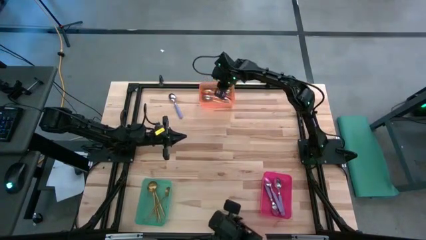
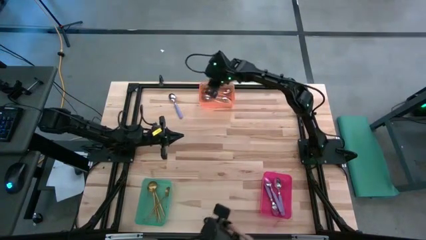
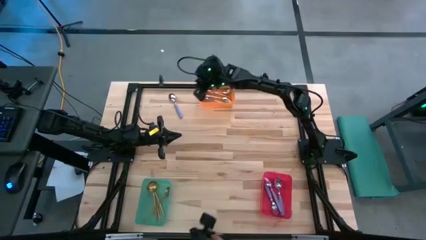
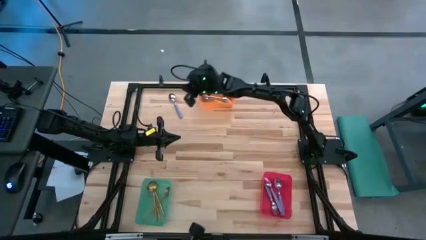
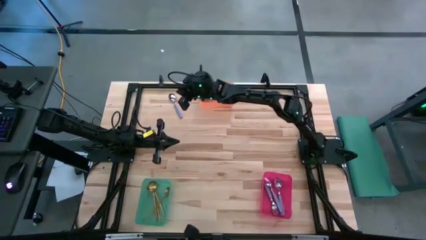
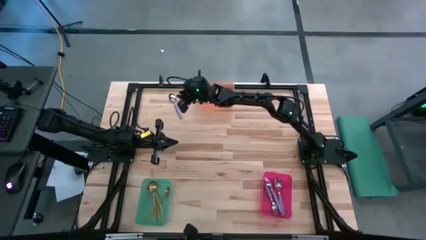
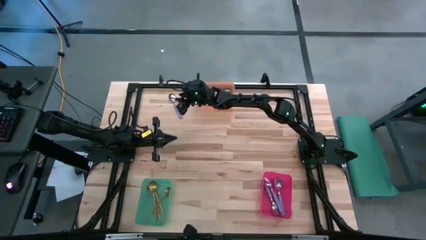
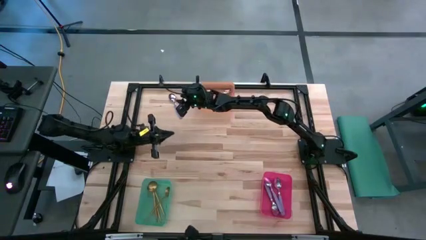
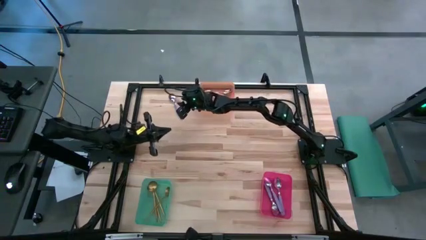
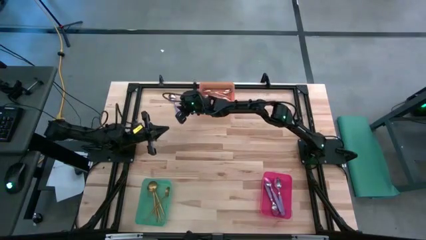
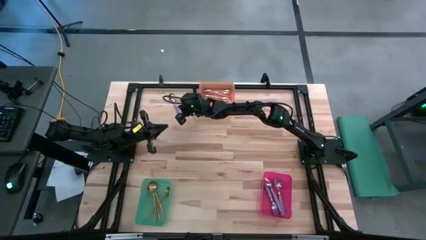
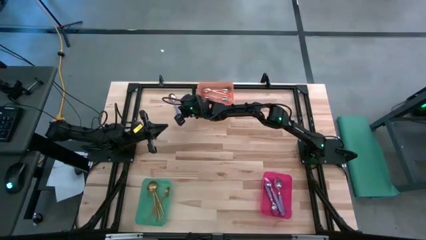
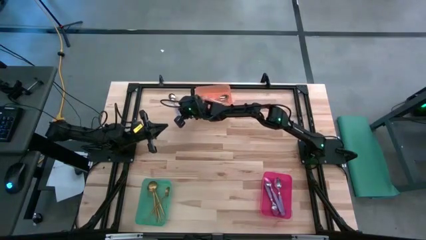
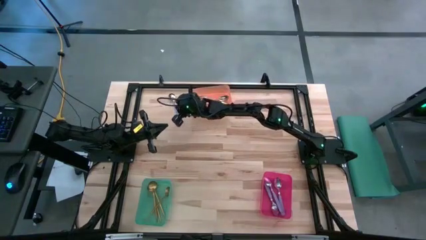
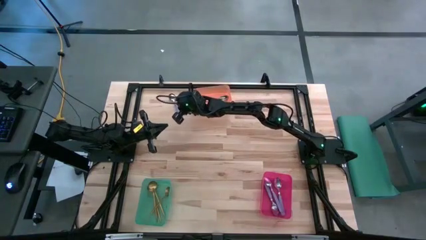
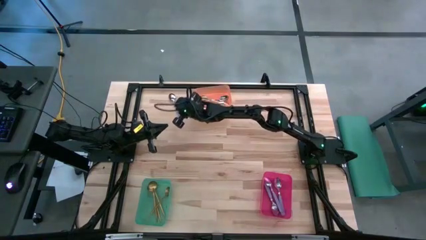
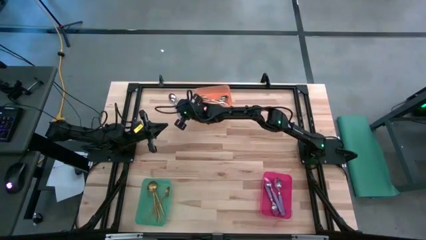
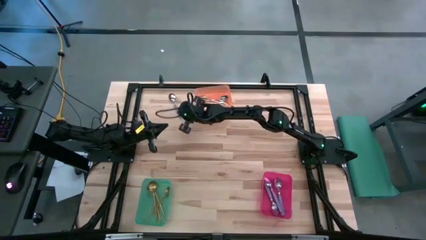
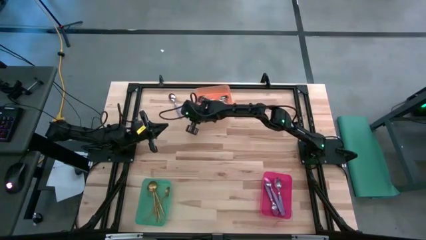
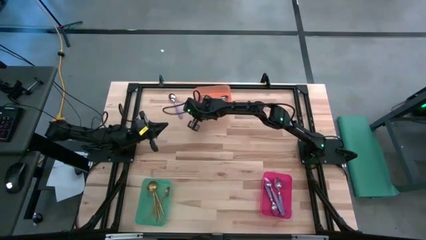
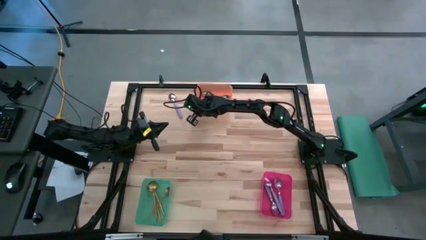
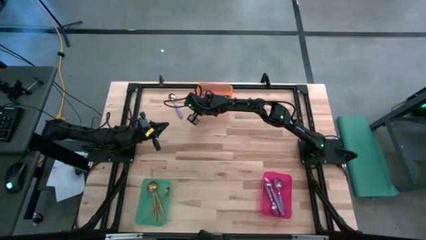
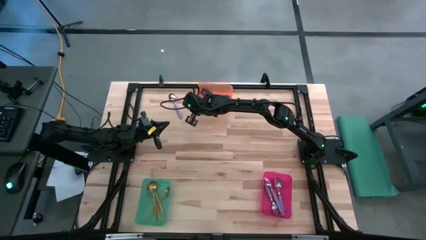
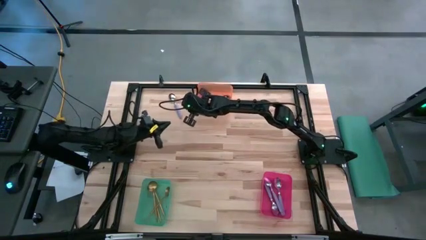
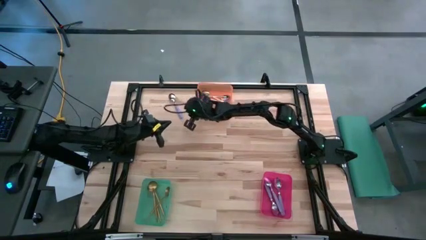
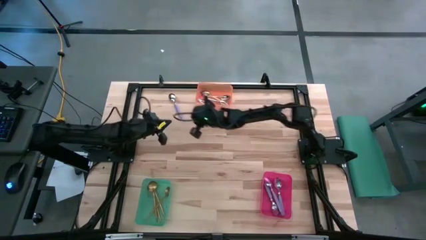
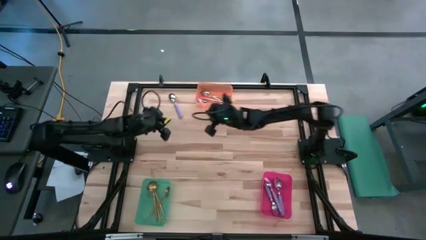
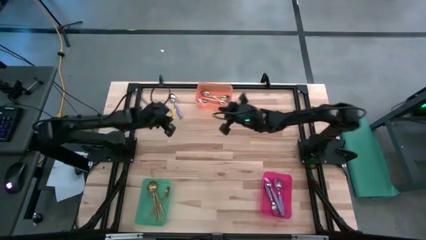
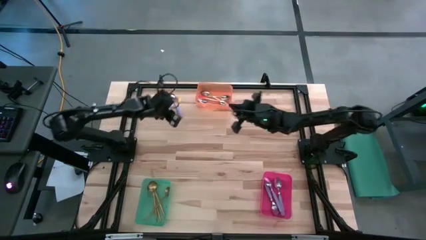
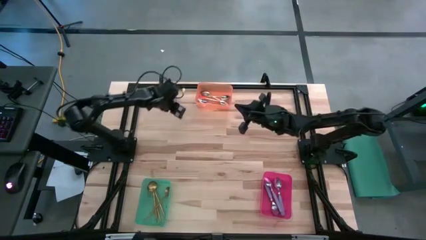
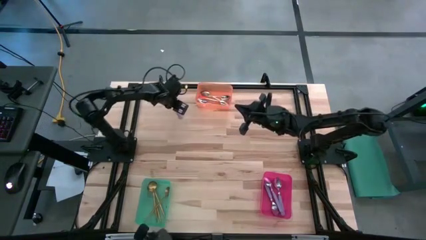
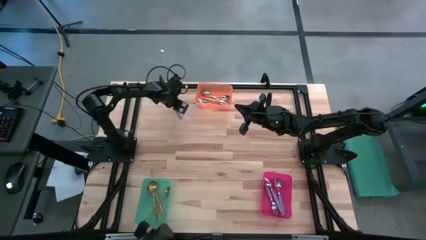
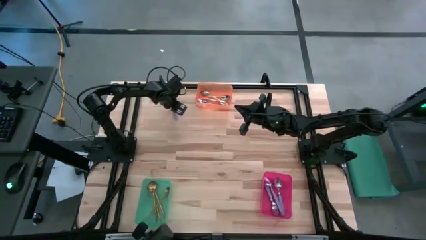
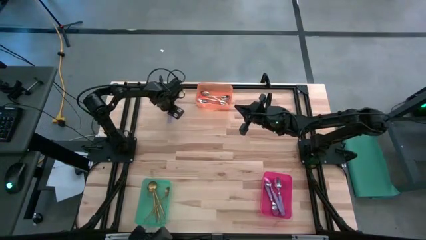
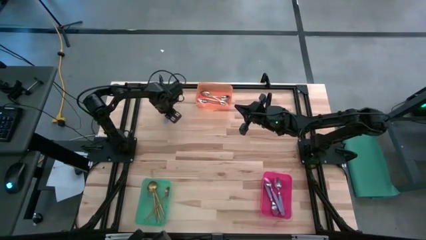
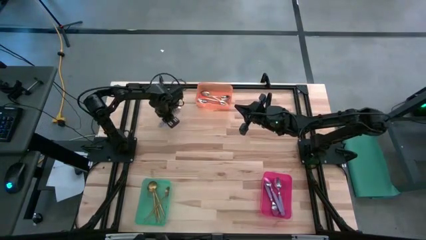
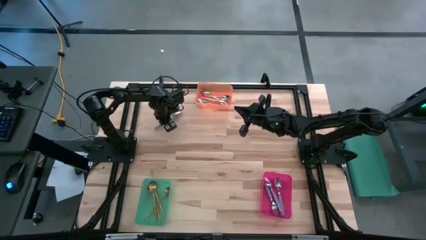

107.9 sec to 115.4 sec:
Task: Sort silverware by color (type)
Put the violet spoon into the bin

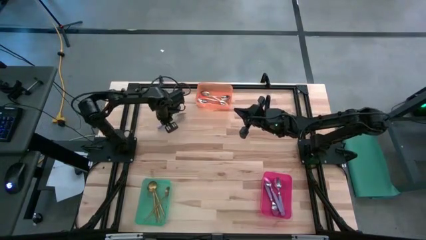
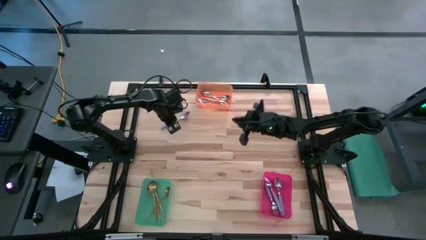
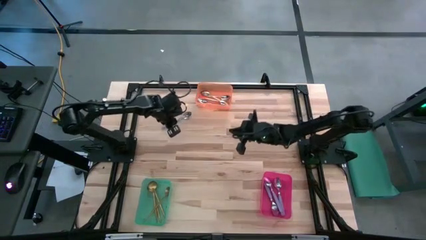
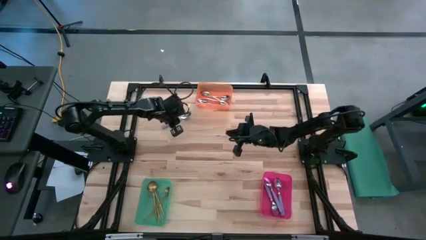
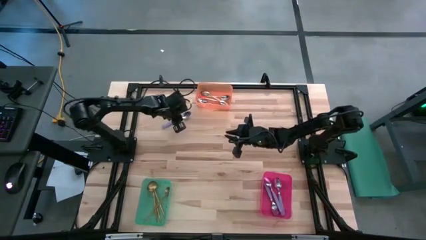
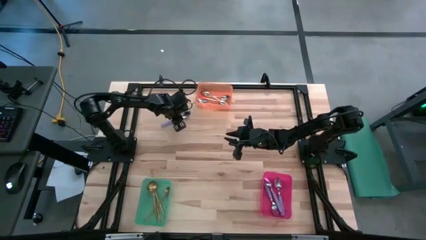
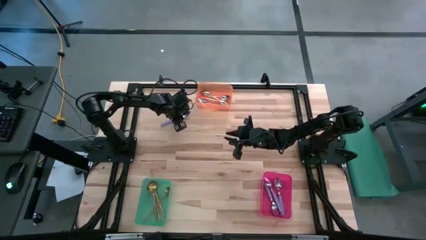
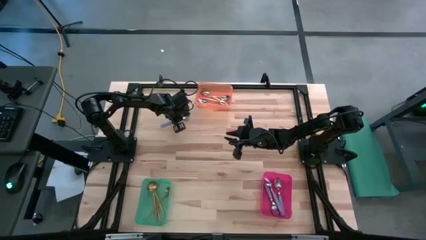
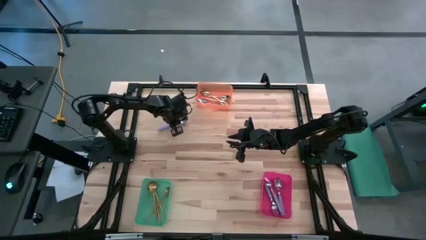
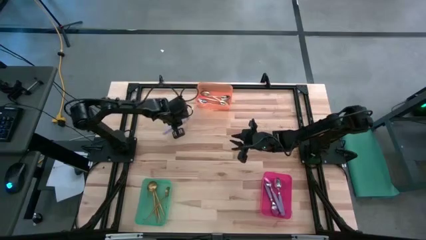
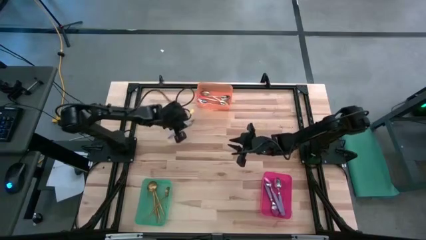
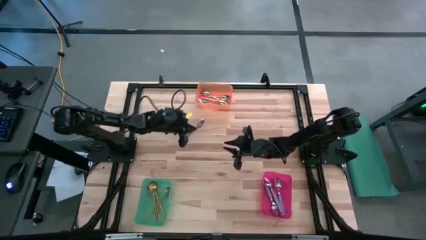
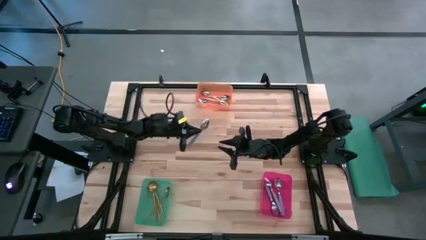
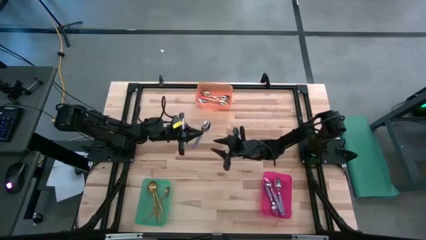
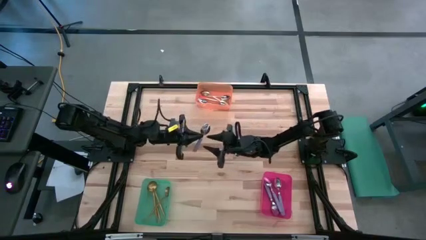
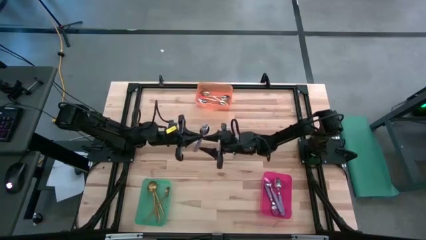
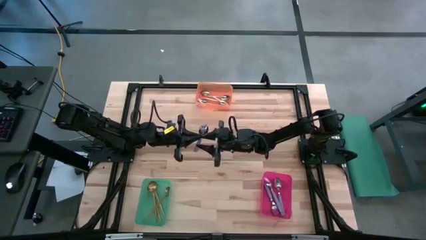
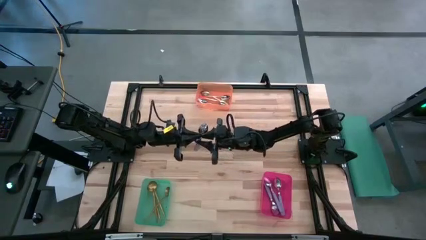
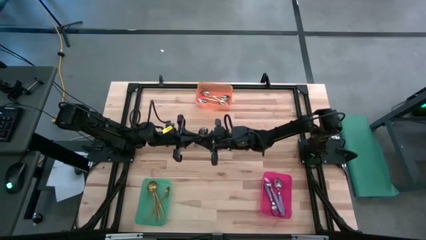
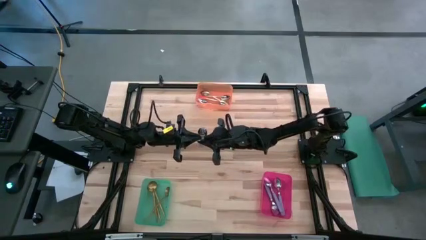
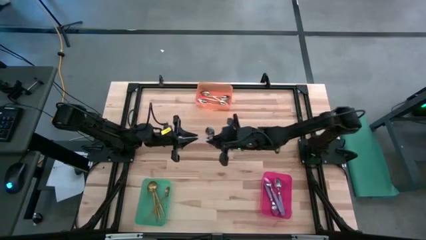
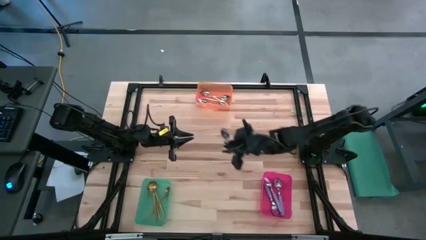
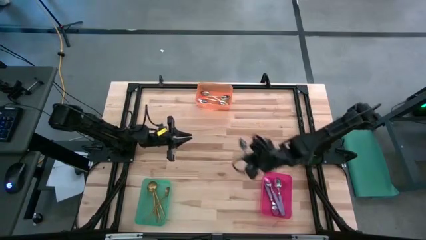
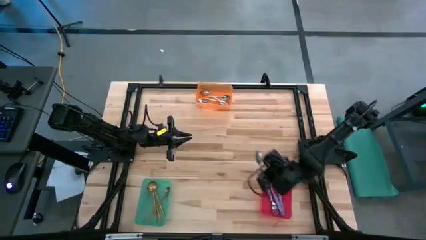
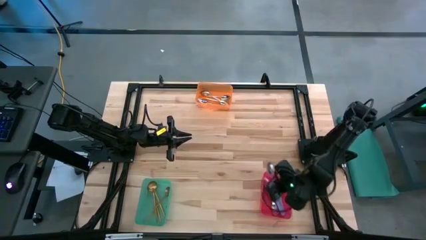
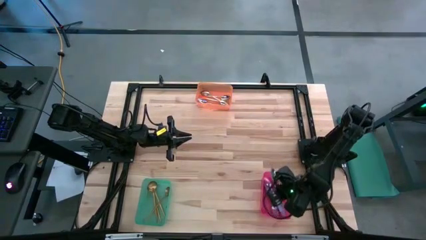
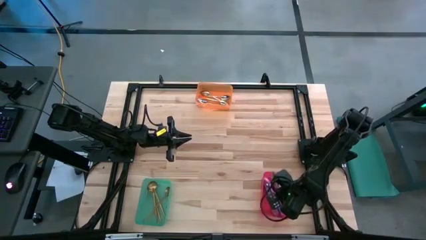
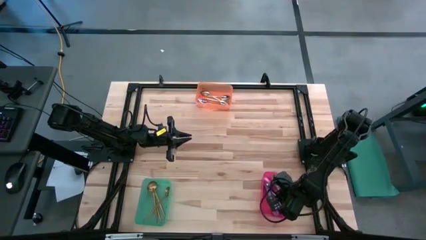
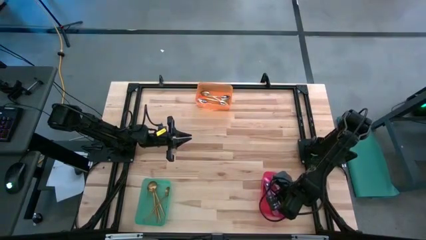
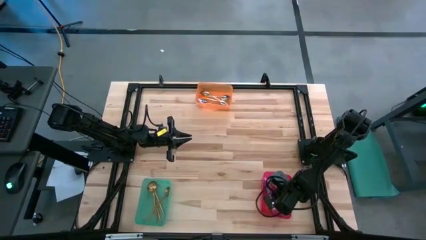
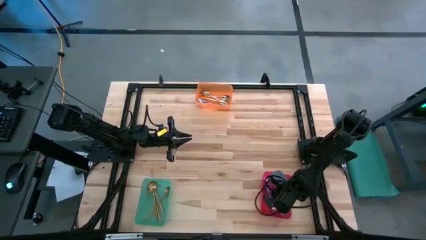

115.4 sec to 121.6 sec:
Put the violet spoon into the red bin

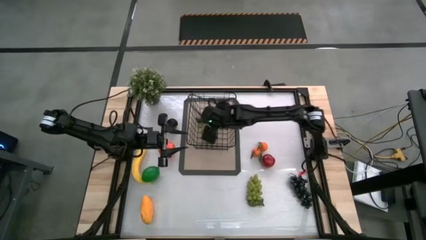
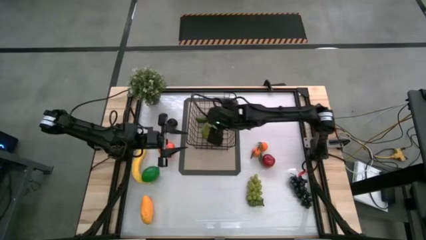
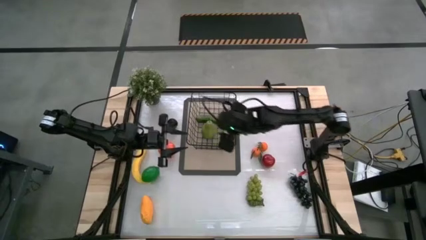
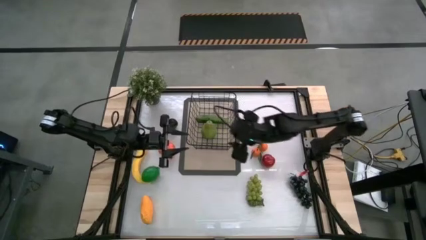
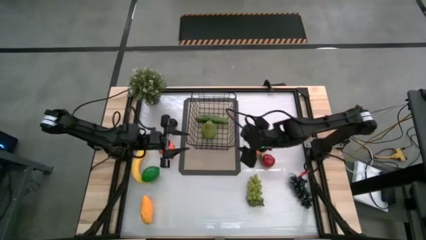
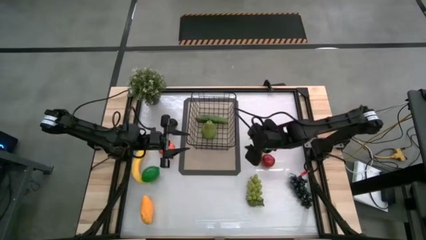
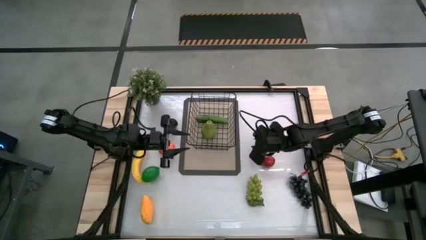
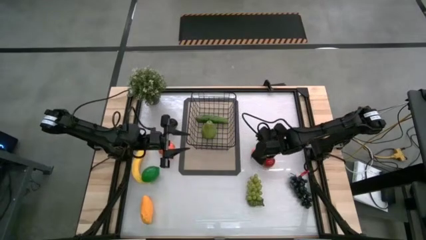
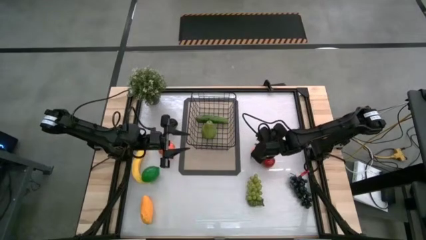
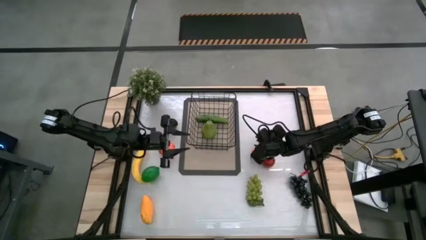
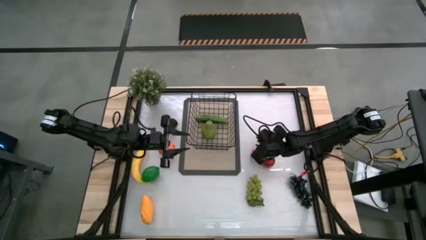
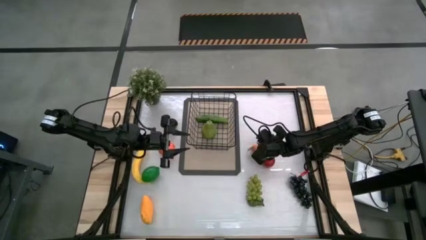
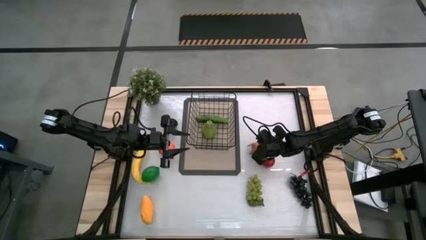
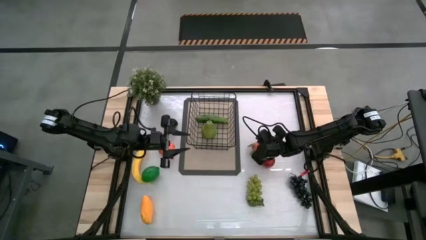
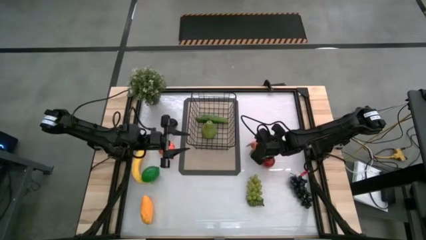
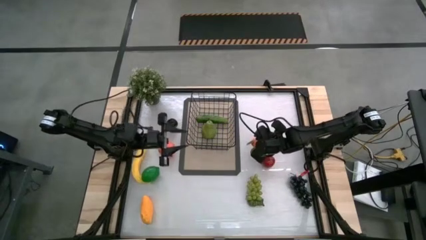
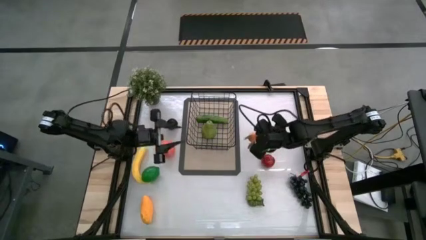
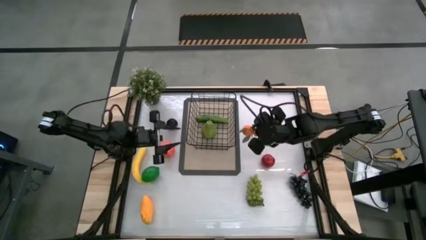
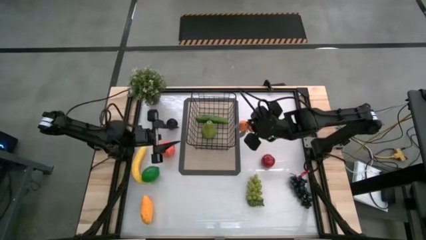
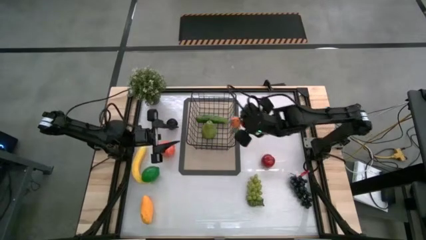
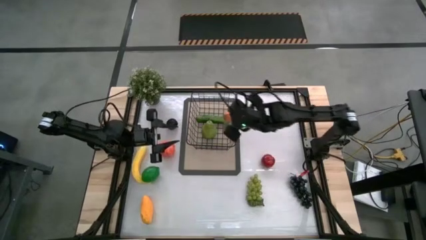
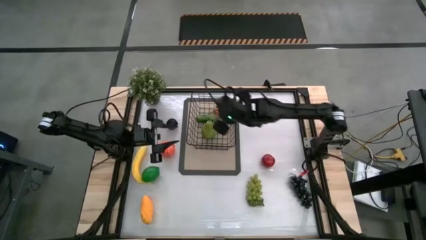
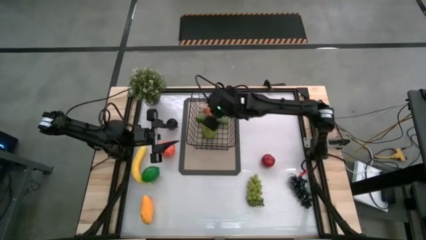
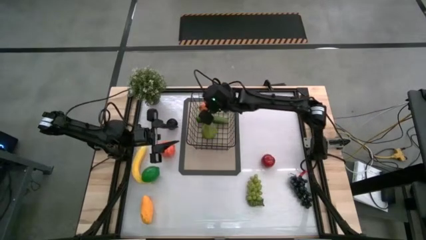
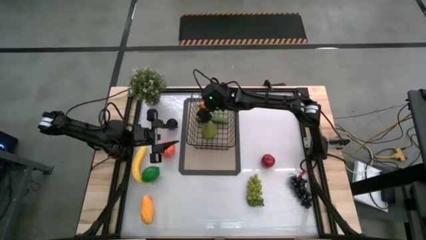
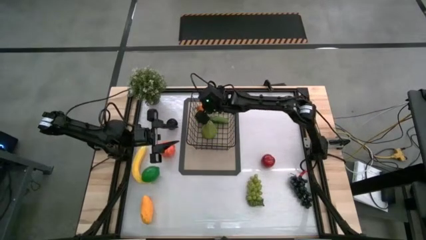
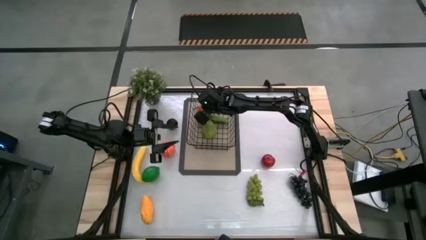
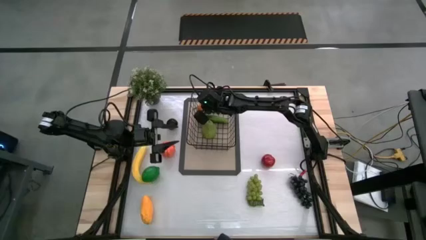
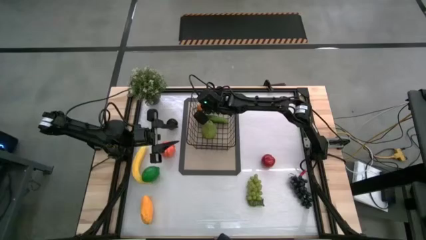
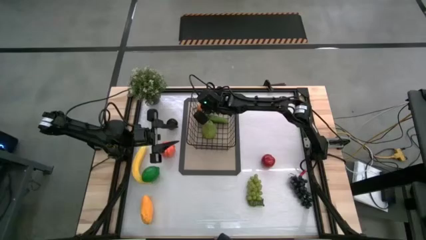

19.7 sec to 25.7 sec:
Task: Build produce basket
Put the tangerines into the black wire basket
